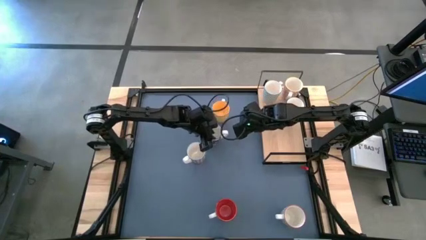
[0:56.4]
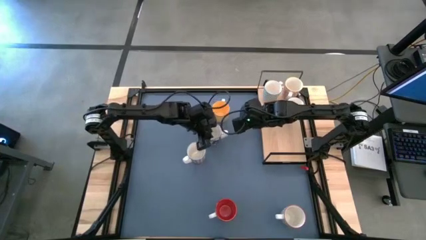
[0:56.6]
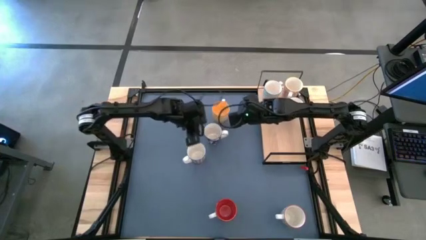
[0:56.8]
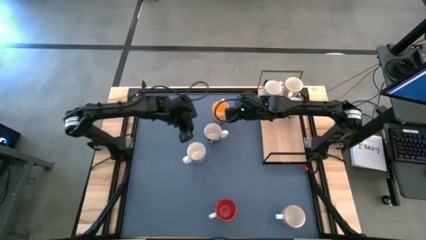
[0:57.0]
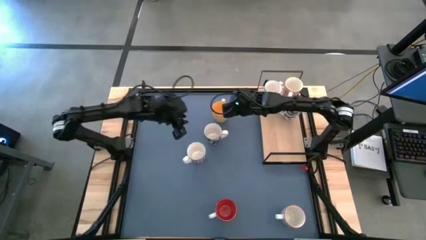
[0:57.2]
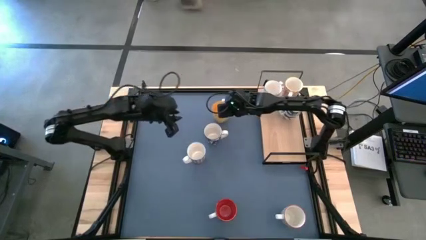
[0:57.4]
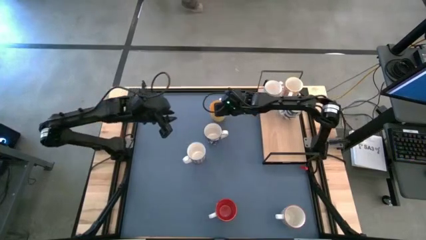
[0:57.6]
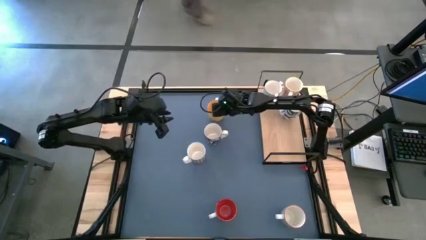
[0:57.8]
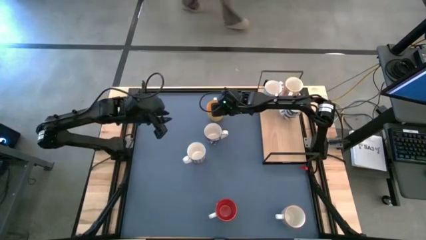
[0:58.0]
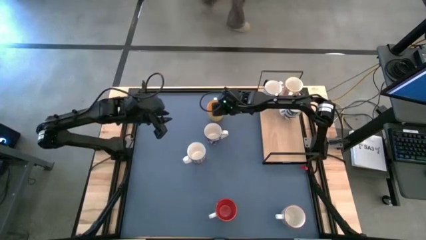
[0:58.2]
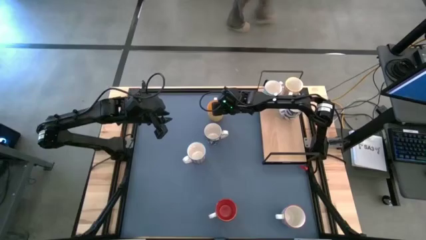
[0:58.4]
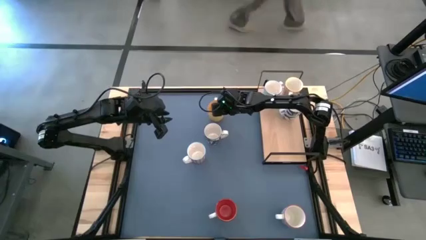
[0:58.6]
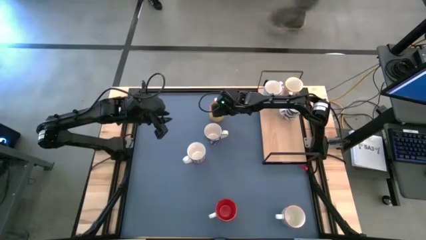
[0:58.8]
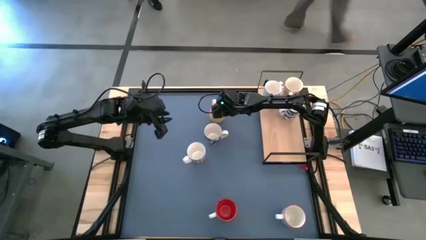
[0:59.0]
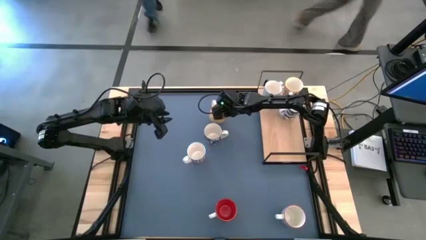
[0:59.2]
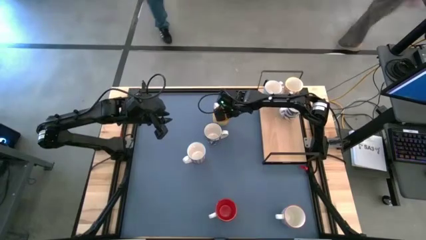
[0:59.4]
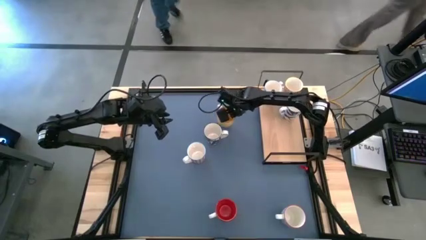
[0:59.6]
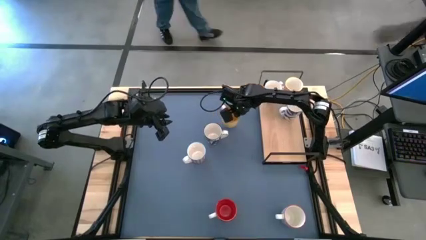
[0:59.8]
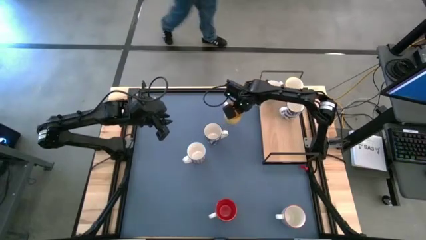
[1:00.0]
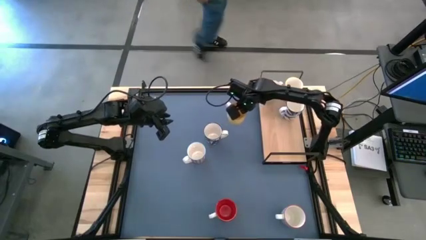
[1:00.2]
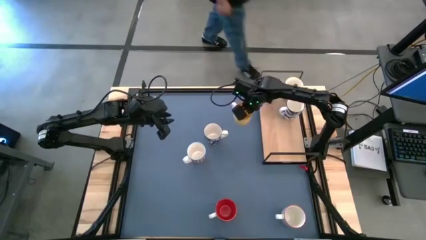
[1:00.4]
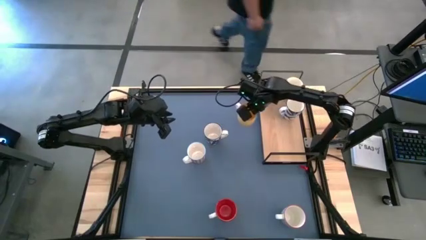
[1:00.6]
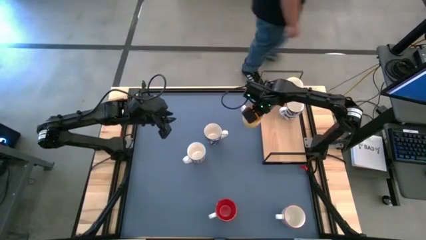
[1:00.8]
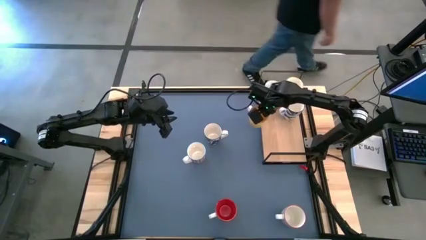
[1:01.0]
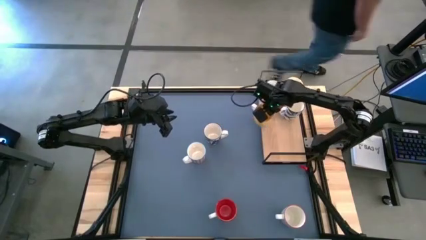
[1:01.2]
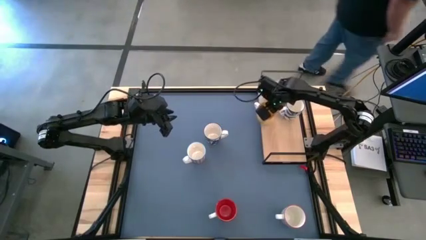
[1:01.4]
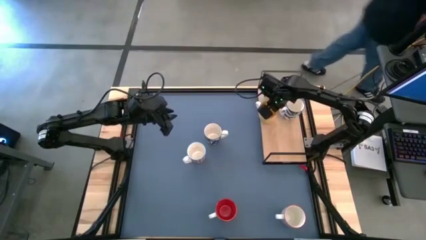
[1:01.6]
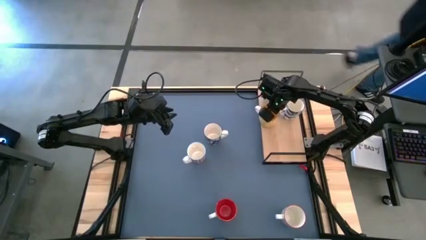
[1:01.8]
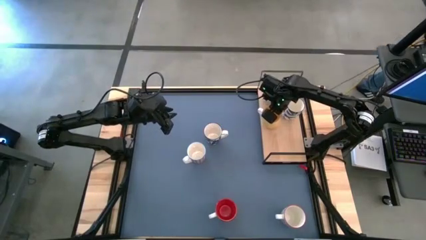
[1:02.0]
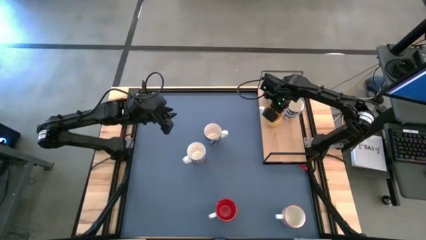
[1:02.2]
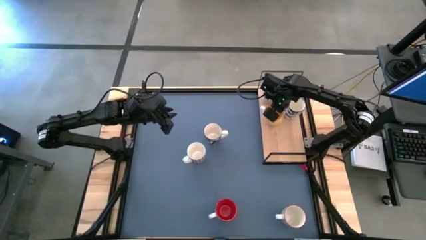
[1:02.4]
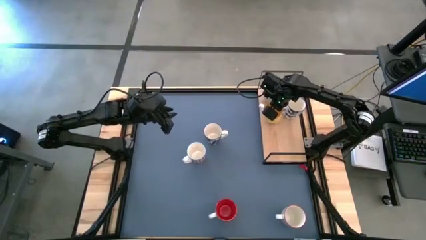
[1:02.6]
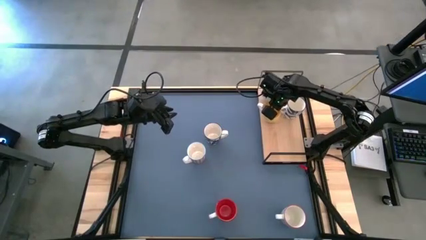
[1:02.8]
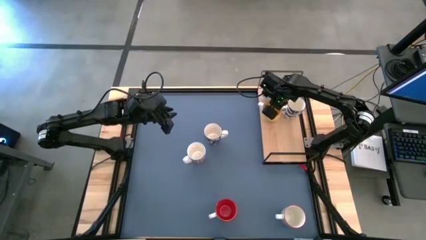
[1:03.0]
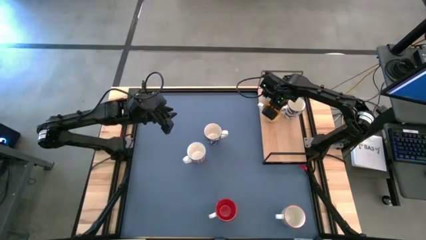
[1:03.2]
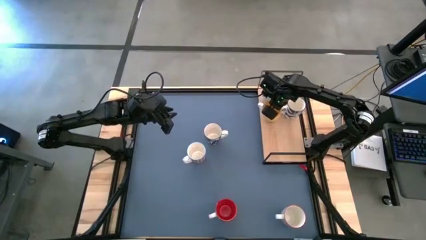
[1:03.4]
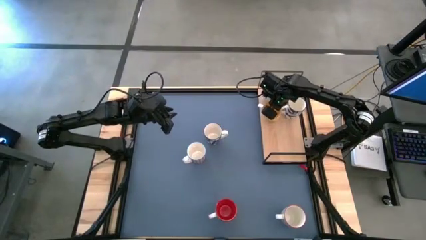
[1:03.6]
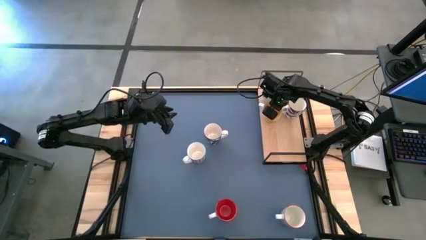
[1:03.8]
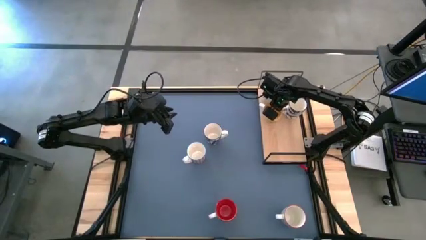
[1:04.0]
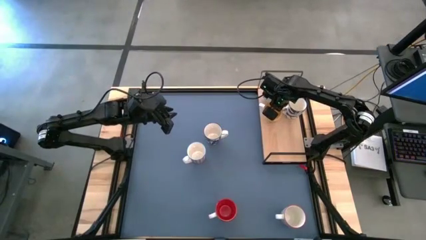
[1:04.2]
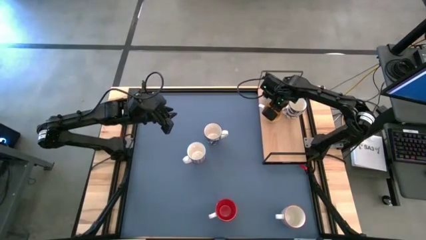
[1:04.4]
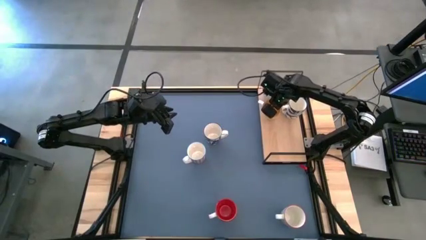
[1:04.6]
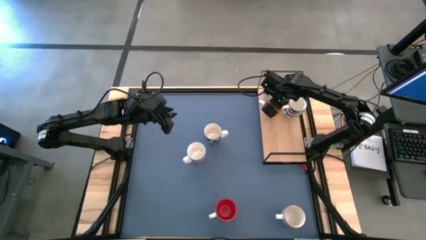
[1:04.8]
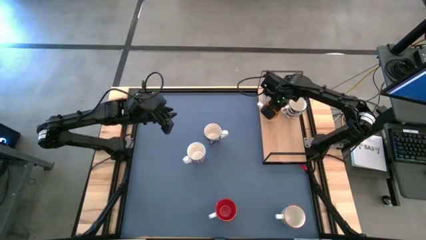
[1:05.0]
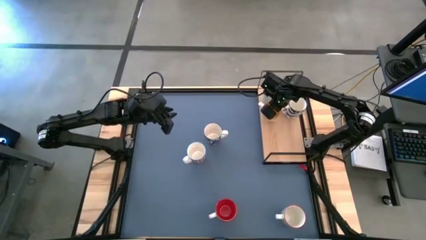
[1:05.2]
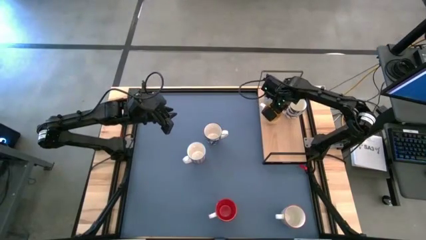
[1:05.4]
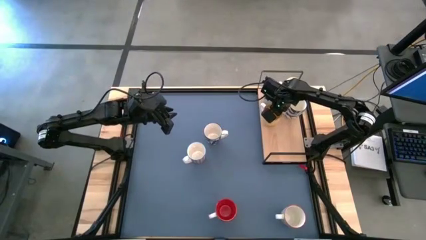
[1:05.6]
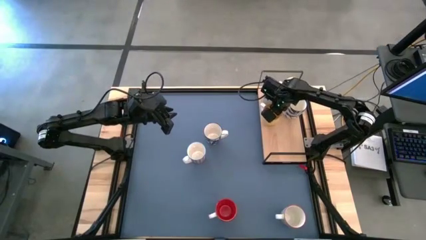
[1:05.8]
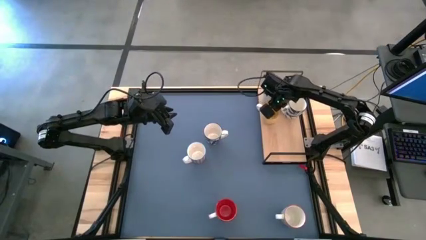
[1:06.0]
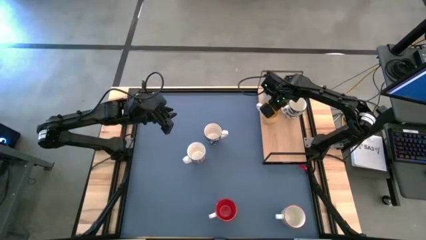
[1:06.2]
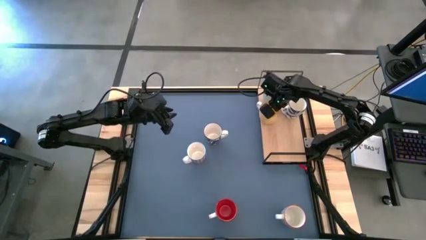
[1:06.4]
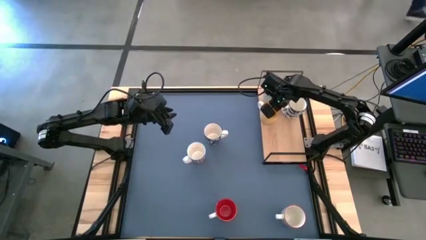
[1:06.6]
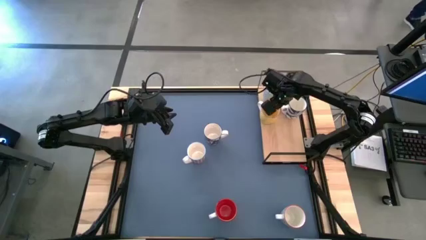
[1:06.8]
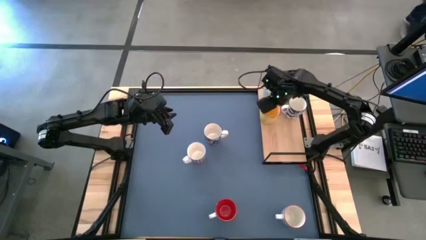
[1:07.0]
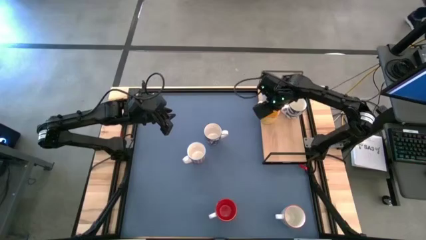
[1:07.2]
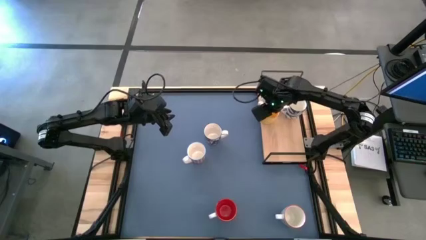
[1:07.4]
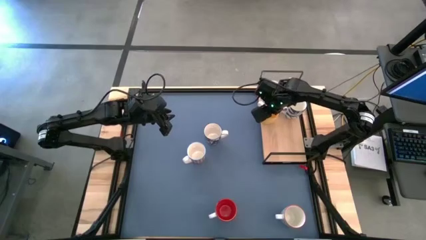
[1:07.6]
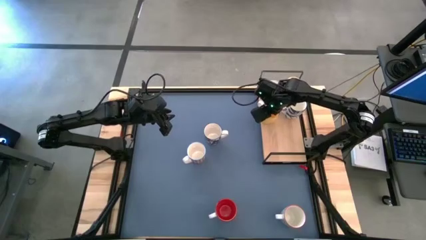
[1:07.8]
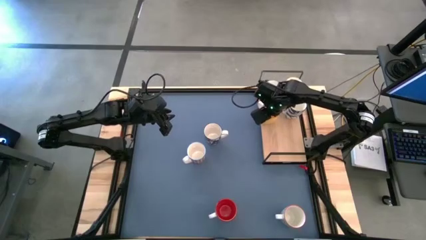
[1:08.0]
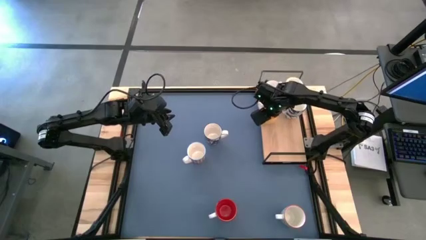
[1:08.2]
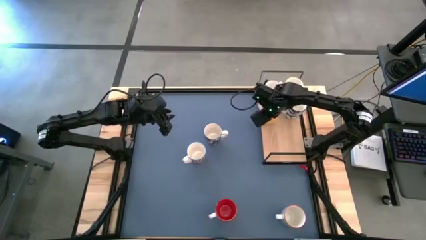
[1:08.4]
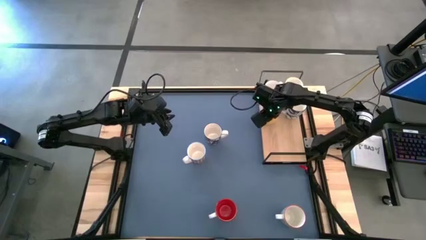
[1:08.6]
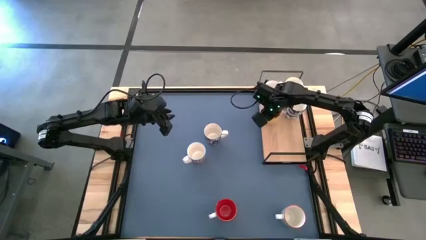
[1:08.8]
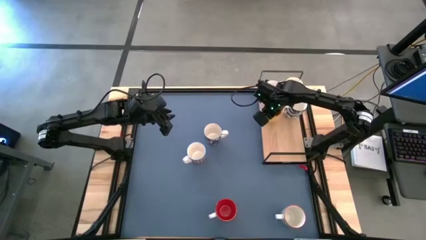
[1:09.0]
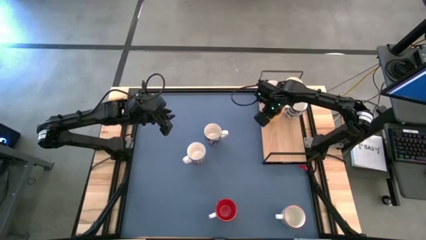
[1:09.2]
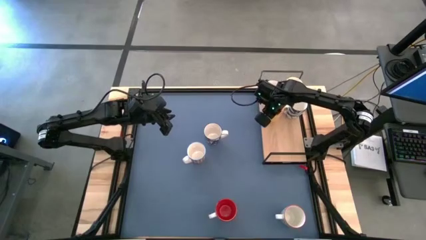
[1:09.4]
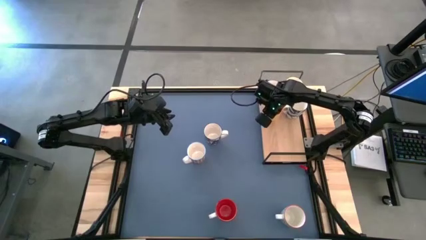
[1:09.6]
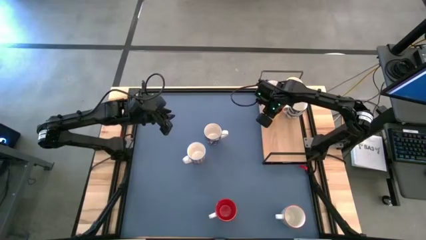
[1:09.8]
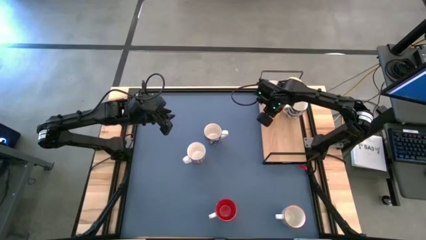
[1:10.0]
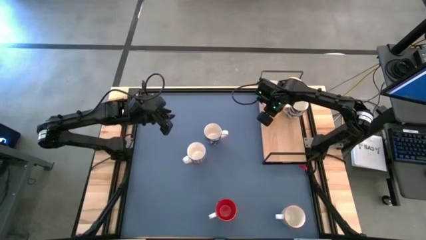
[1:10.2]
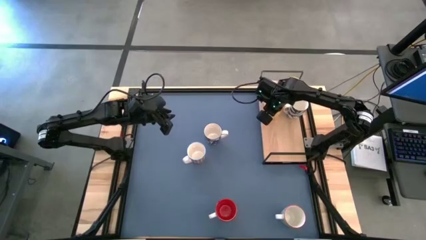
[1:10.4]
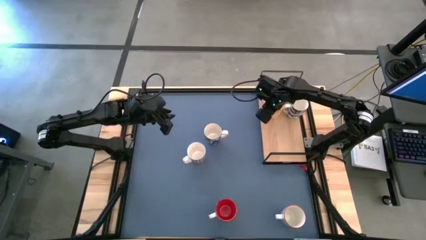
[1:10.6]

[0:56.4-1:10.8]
Task: Place coffee mugs
Put the yellow cup on the shelf aligned with the dark blue cup

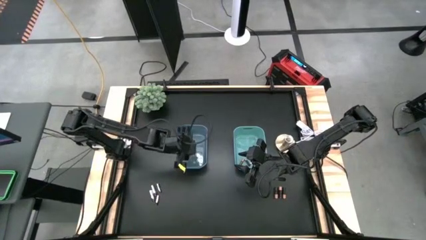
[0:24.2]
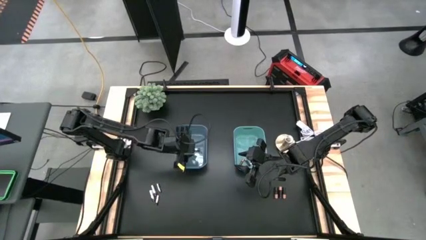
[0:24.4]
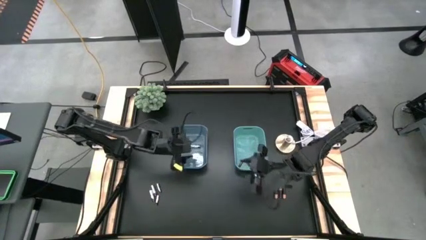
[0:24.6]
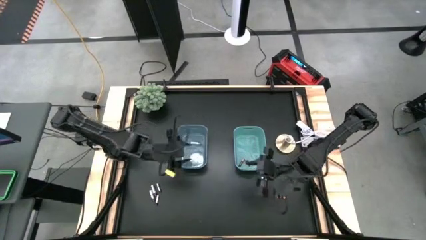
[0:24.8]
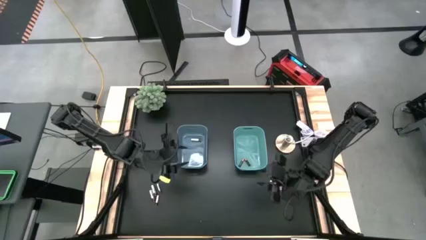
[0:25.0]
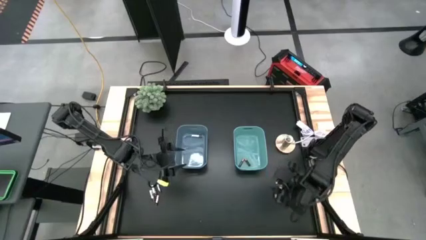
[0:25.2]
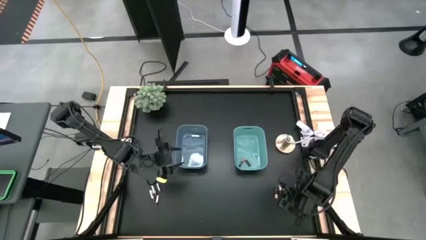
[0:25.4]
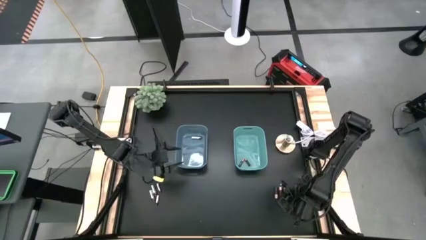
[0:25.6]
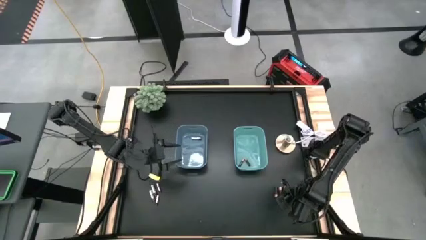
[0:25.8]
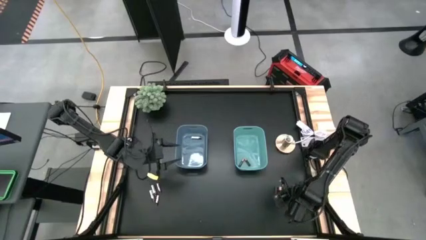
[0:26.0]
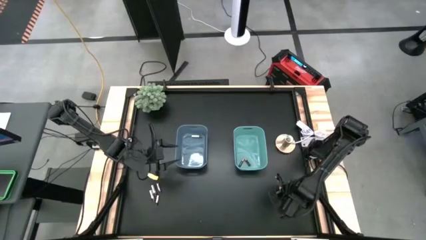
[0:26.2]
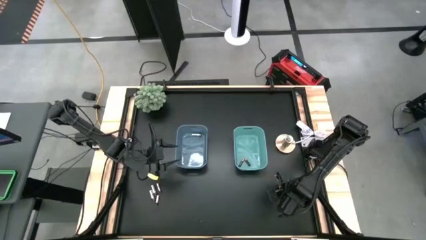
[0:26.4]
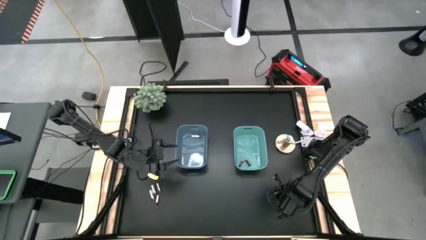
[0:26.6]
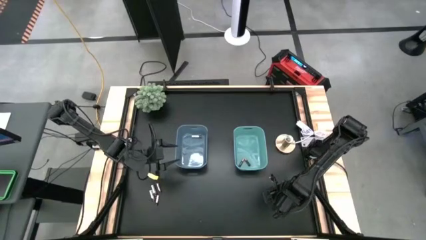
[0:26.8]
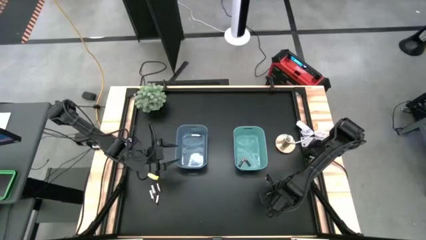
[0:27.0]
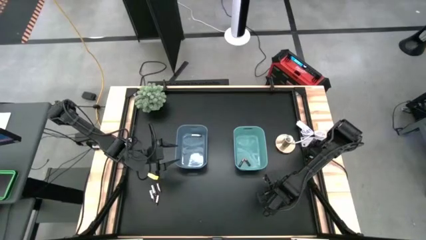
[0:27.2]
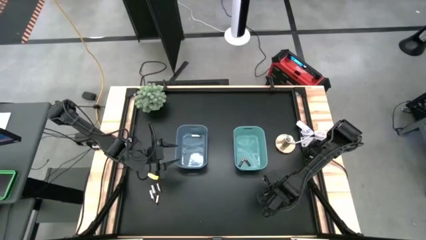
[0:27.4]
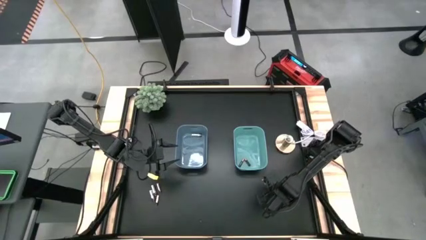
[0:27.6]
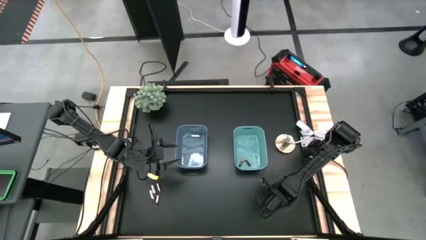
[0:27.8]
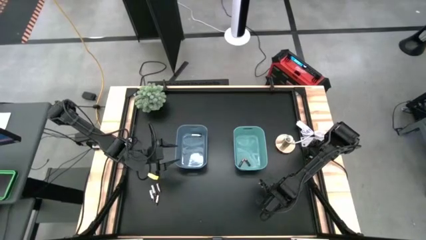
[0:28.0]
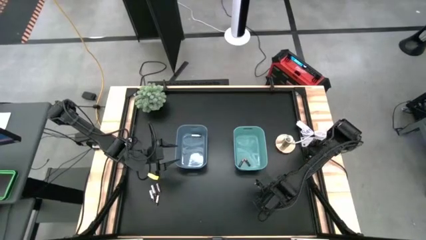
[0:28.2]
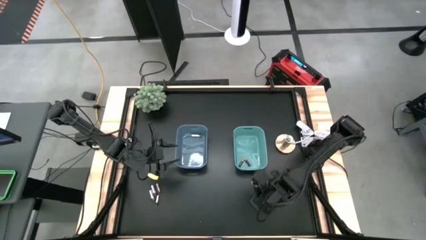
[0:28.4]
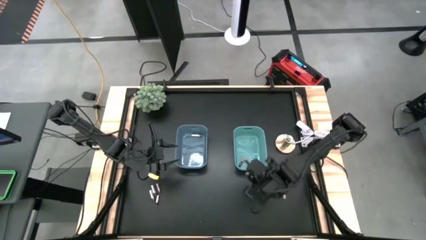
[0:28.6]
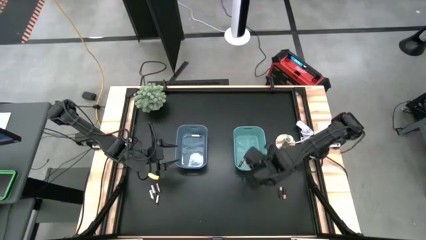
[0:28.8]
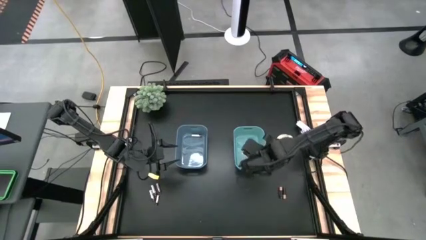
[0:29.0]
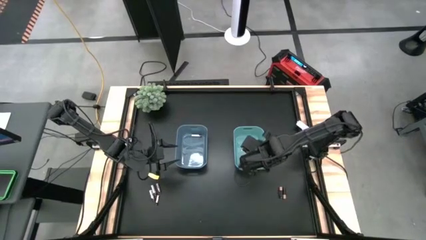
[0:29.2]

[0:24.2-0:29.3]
Task: Sort batteries
Put the big black battery into the green bin
